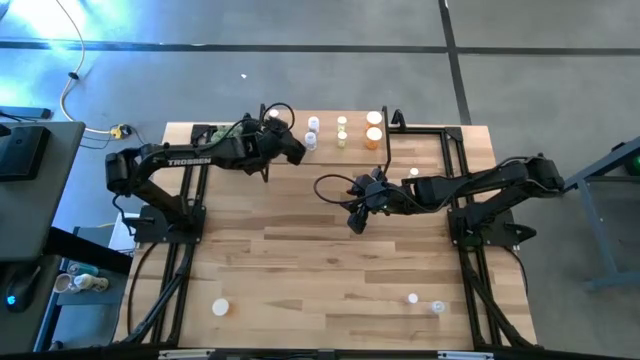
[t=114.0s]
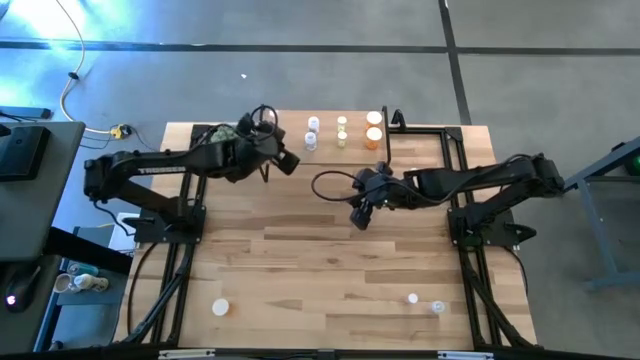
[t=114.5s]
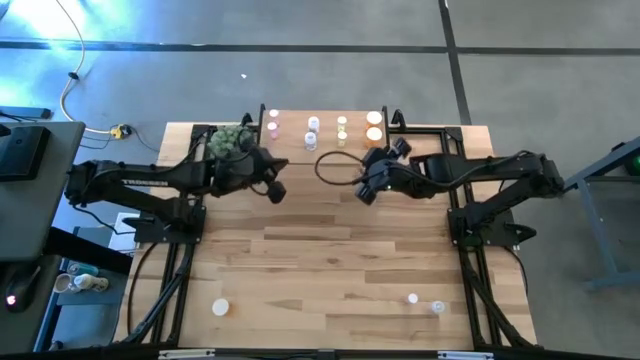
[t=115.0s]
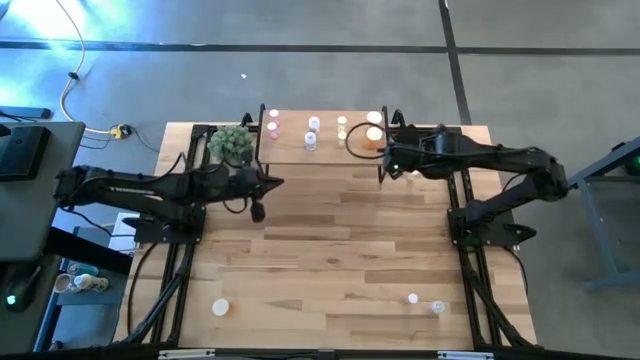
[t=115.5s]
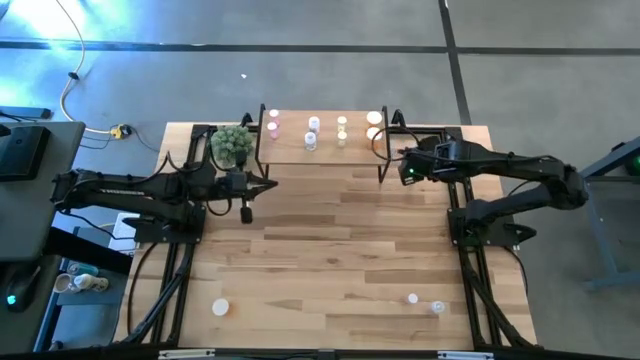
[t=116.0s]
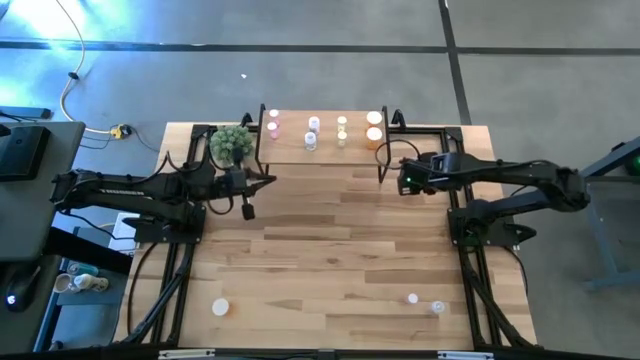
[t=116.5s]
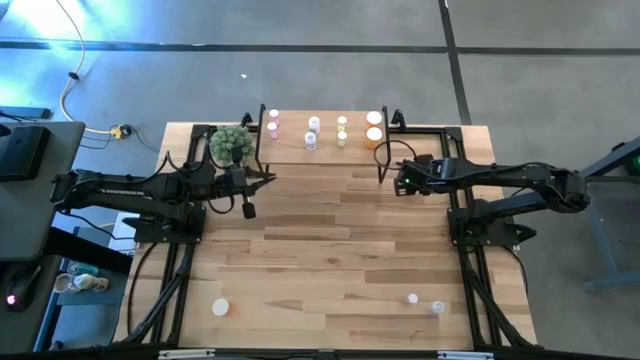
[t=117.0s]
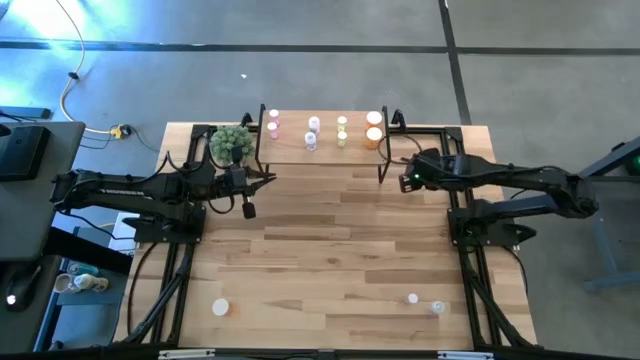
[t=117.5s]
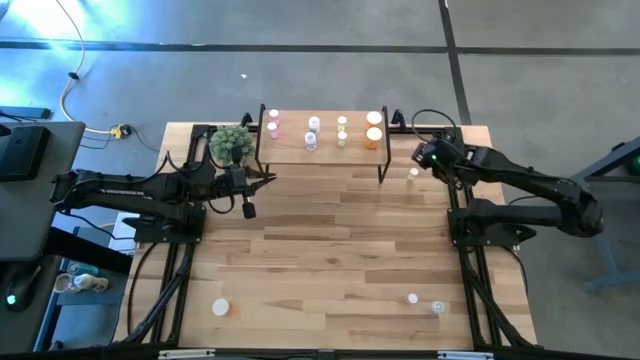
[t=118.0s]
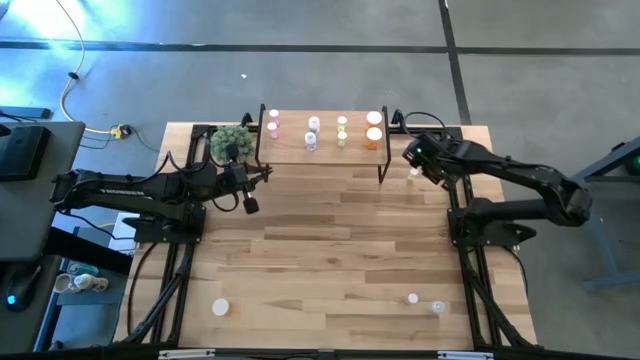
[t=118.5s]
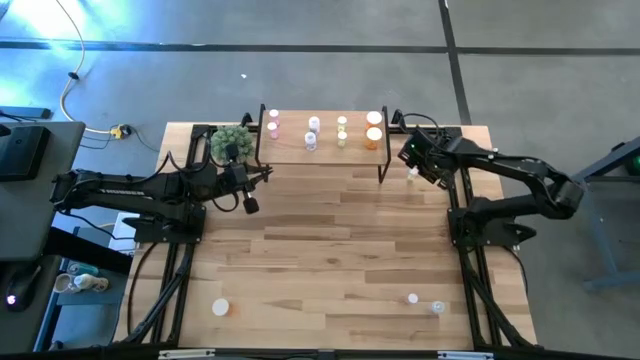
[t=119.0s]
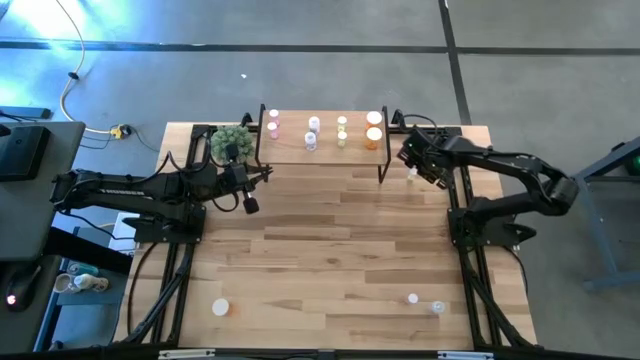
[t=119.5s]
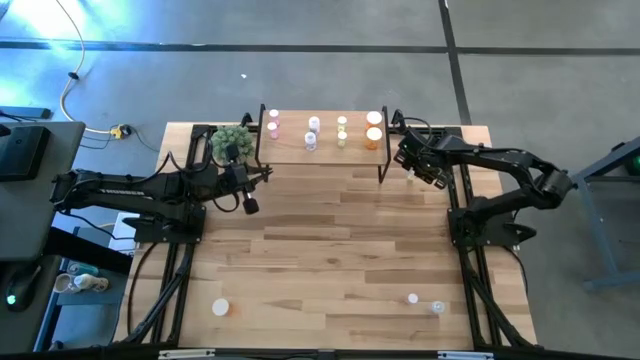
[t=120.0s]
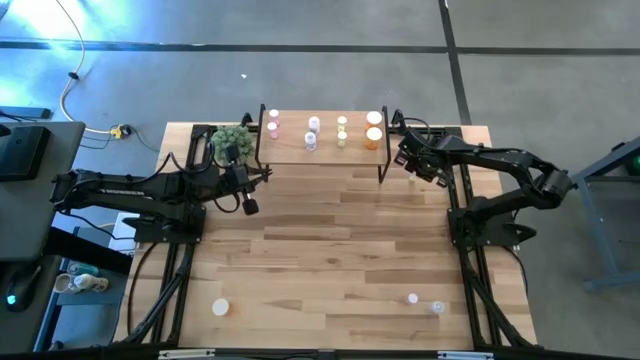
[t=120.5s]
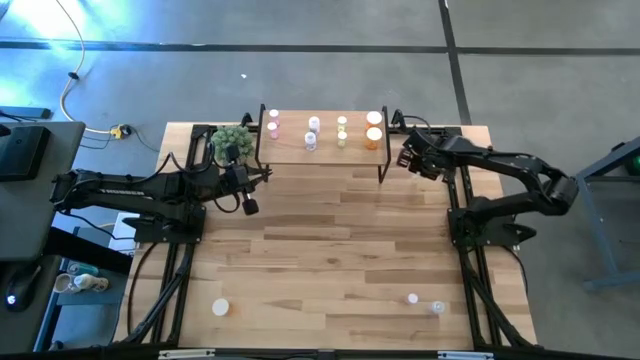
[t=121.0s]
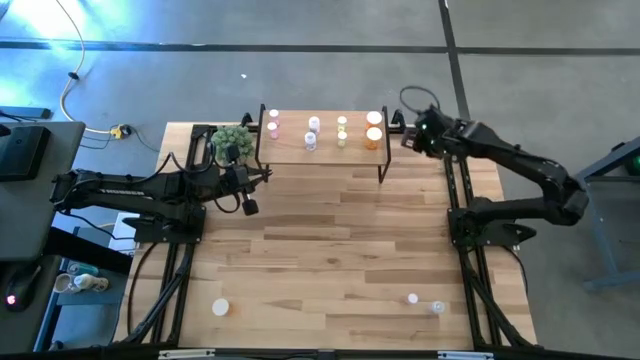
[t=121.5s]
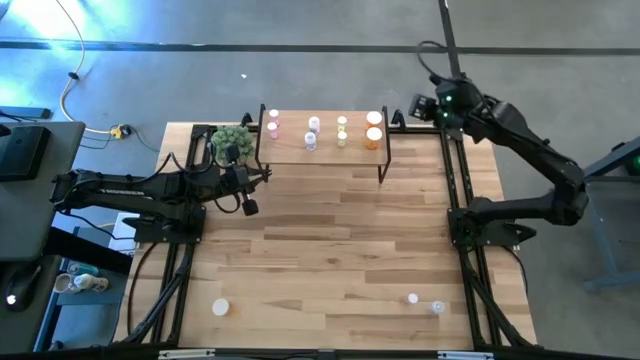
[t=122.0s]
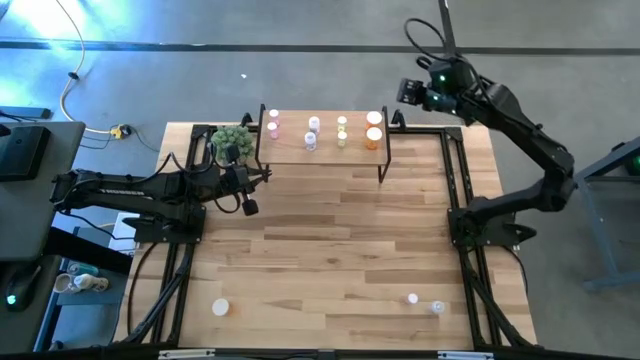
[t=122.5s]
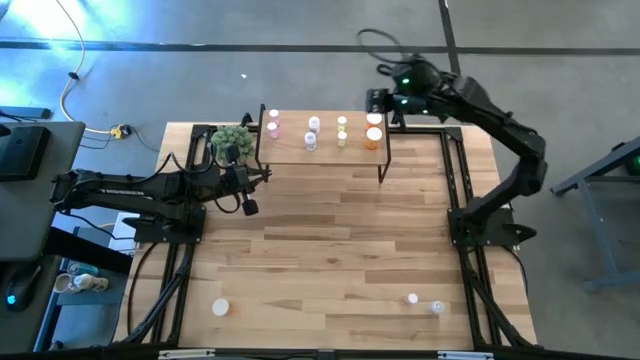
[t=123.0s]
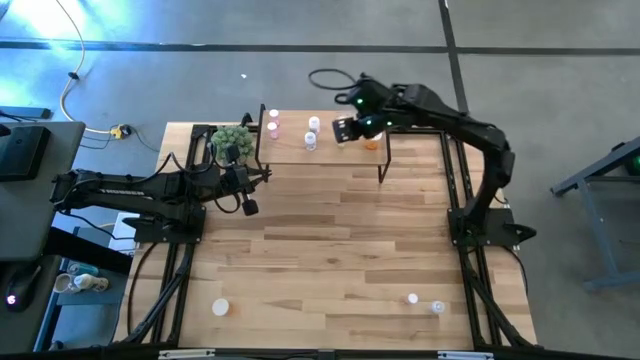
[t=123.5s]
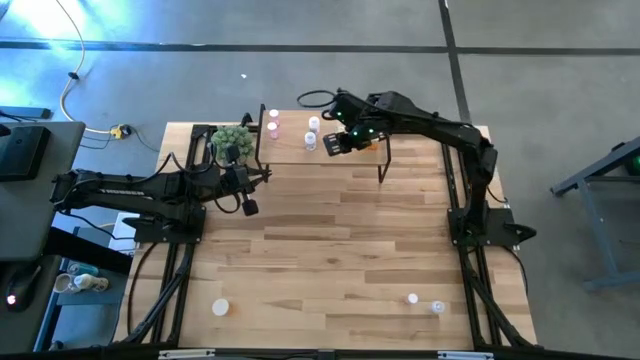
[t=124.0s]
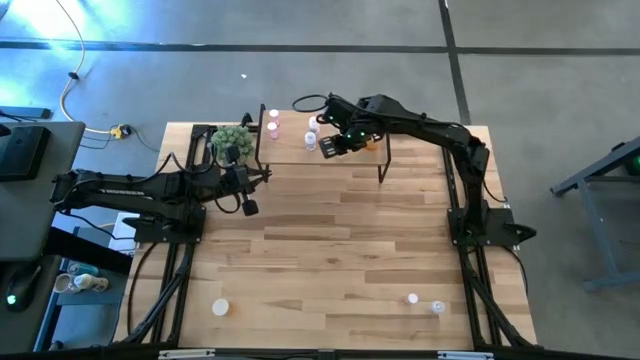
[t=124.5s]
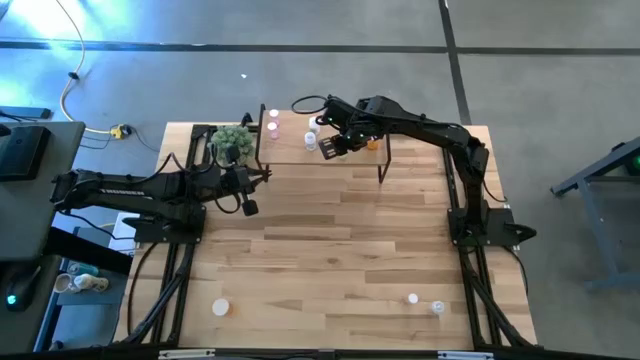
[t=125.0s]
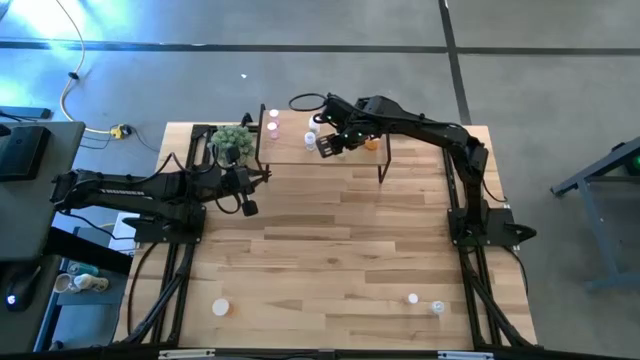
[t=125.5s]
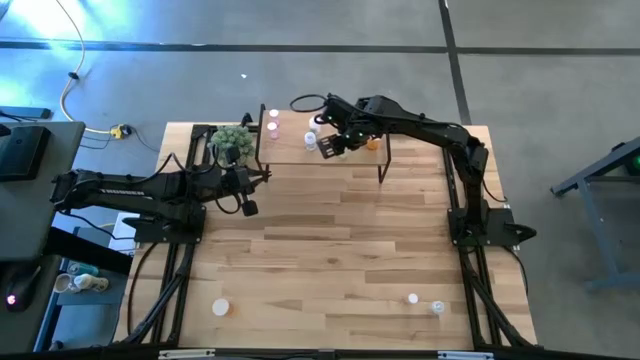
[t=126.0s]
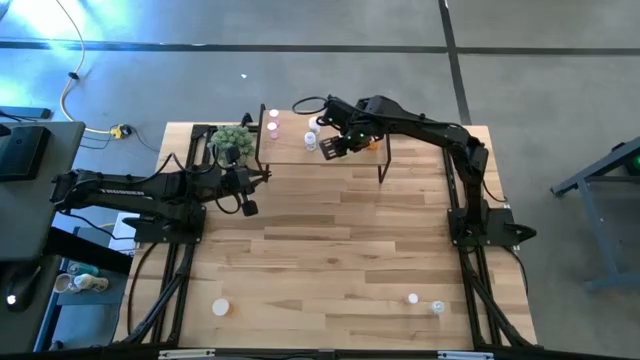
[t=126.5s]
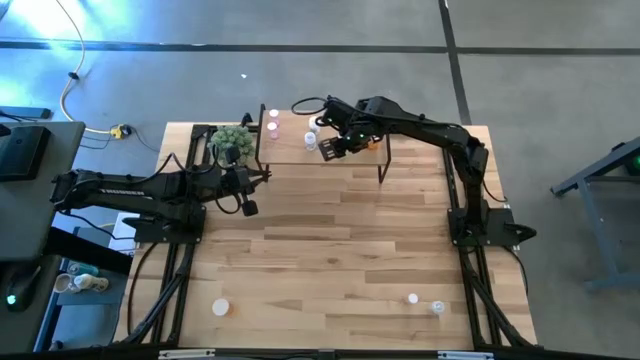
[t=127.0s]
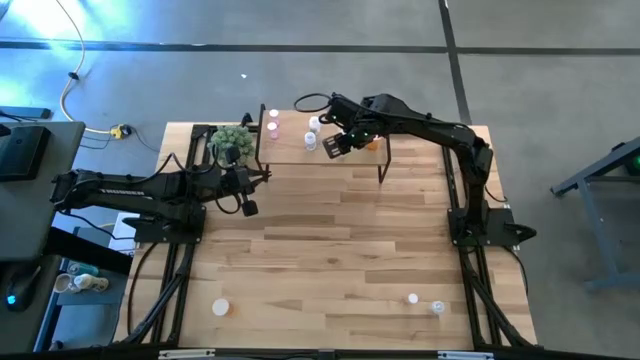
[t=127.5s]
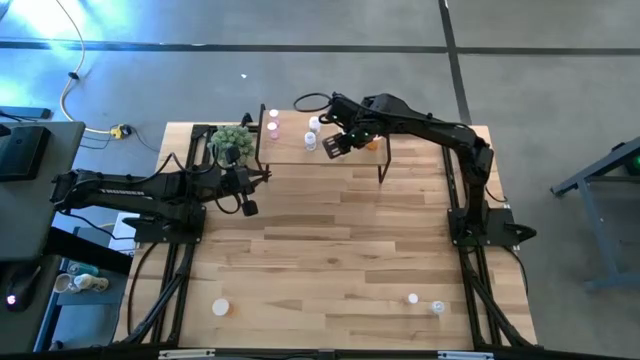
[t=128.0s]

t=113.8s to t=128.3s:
Task: Pick and place medicine bottles onto shelf by color
Put the yellow pill bottle on the shelf aligned with the other yellow pill bottles

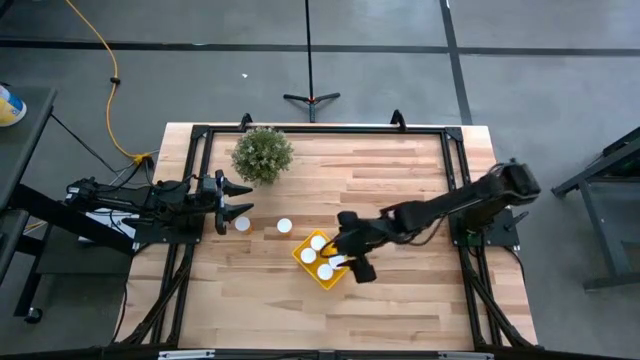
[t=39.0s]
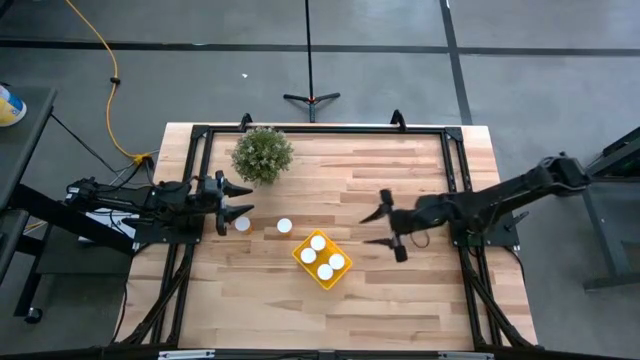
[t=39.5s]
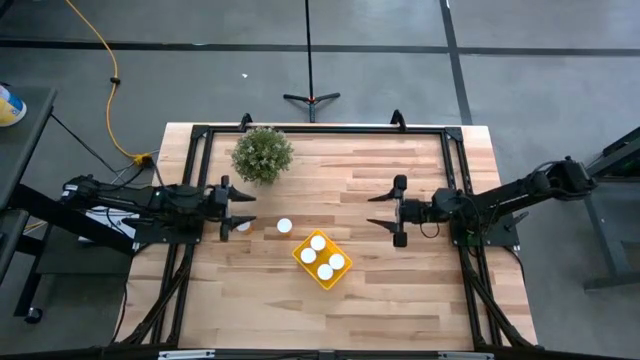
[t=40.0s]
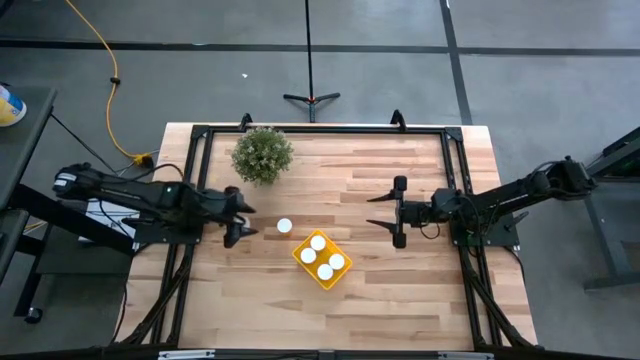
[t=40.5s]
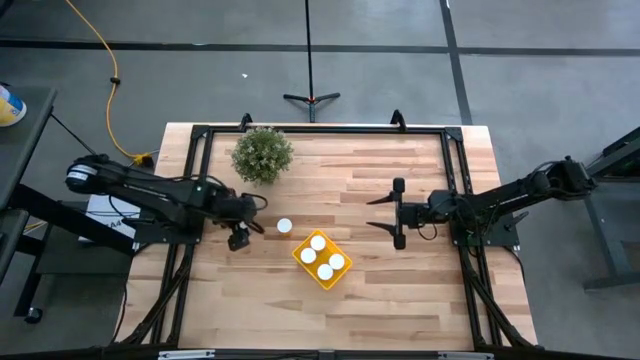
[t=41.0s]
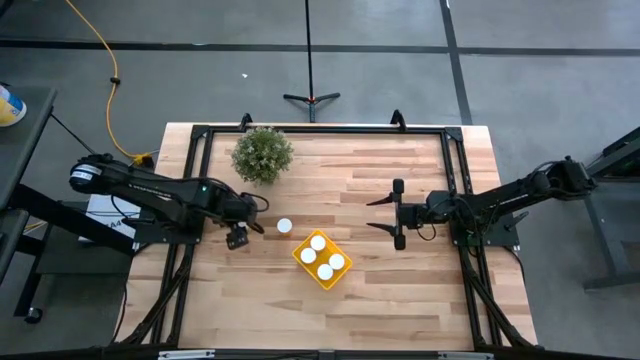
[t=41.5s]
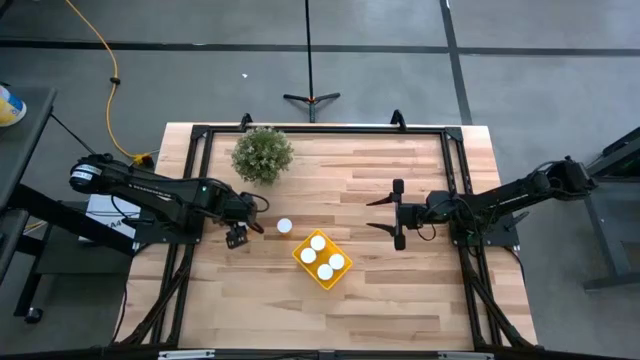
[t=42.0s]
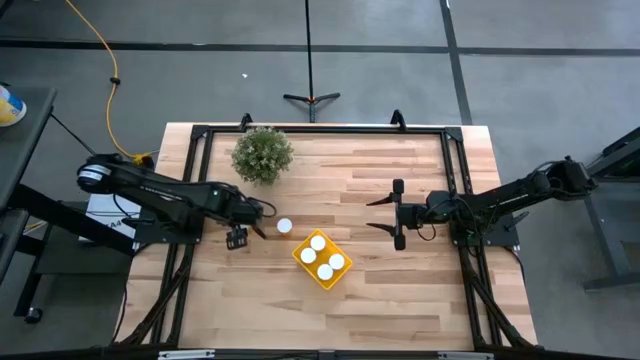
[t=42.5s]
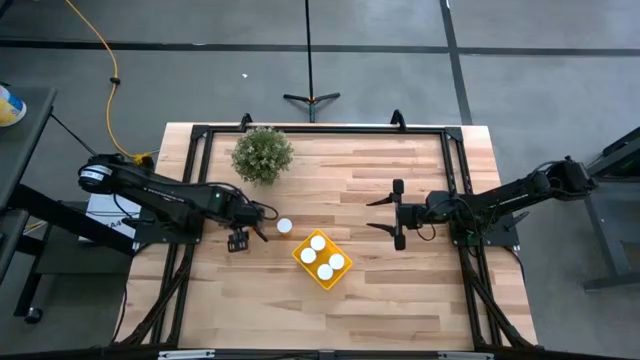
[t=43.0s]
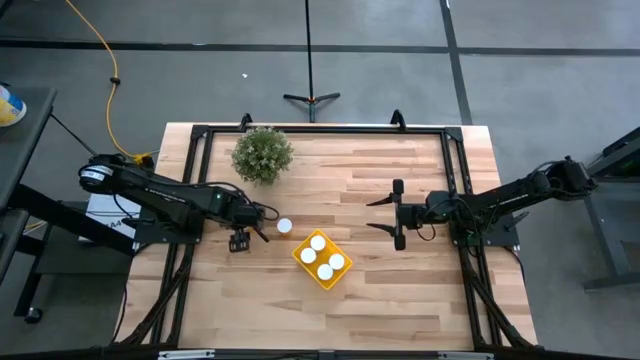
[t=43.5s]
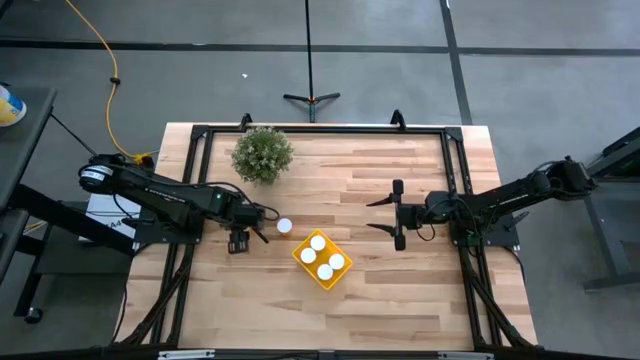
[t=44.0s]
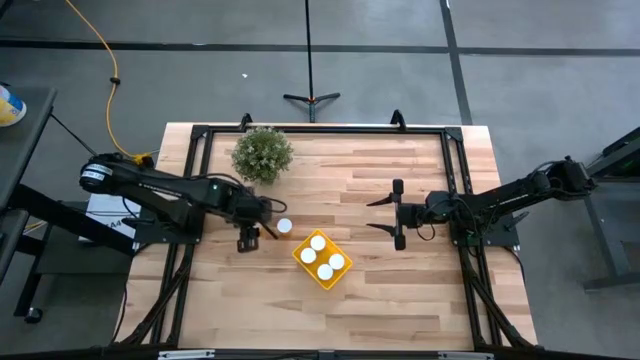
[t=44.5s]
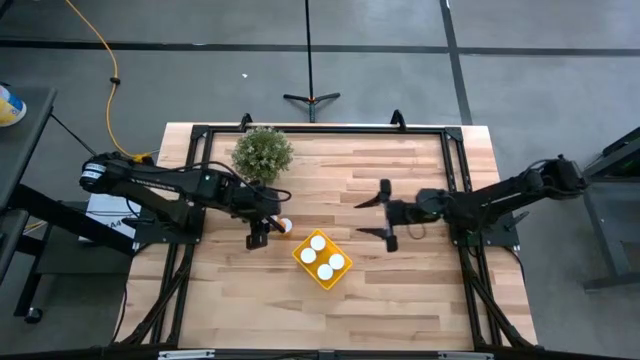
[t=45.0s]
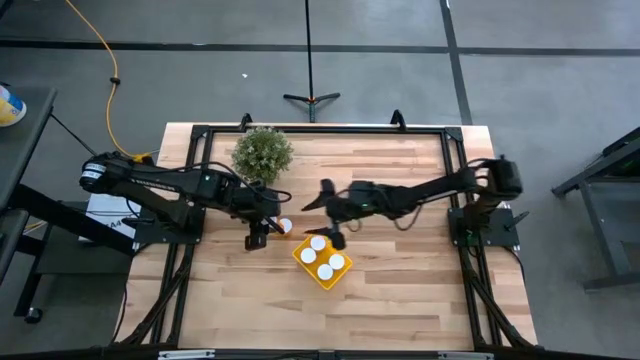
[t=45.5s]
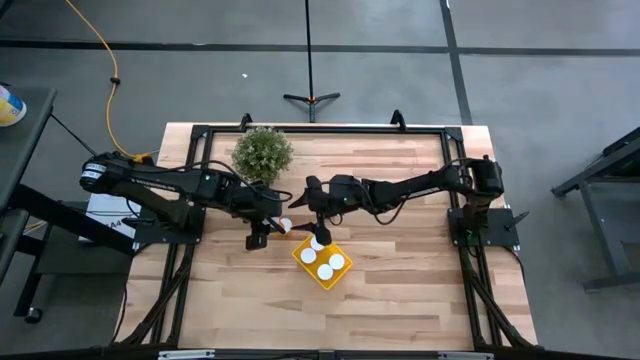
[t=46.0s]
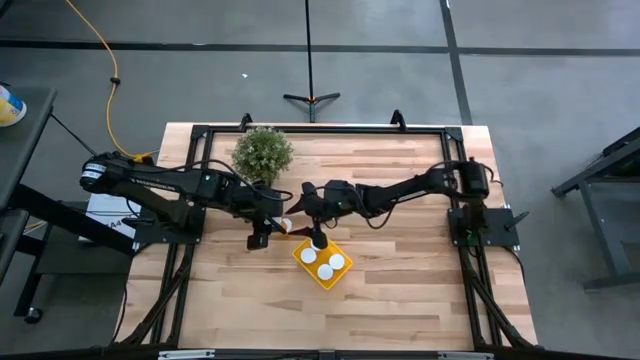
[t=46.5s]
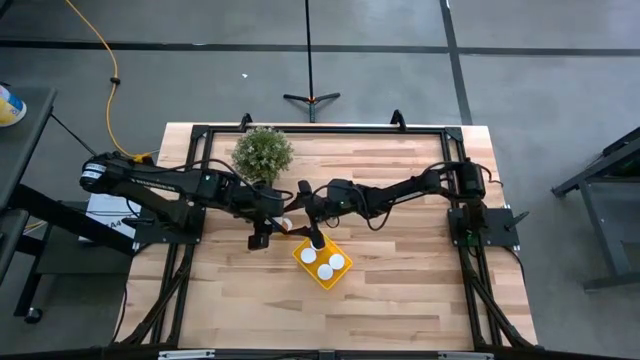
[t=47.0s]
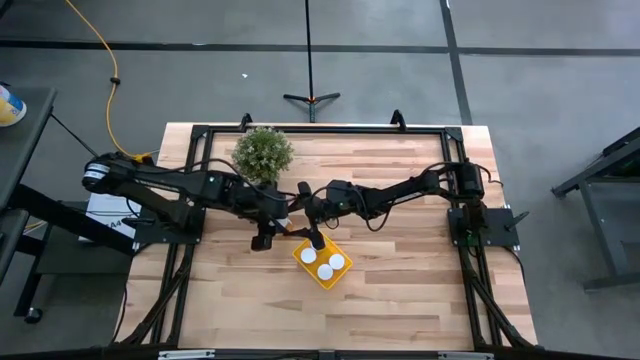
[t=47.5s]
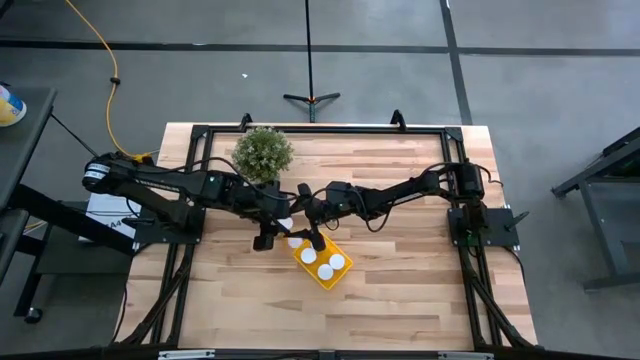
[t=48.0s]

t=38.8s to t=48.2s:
Task: Pick and place pill bottles into a basket
Put the pill bottle into the yellow transparent bin
